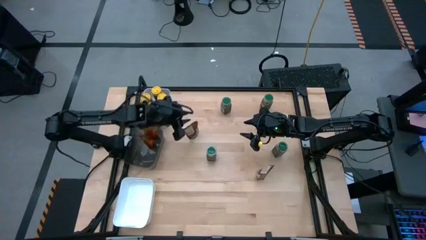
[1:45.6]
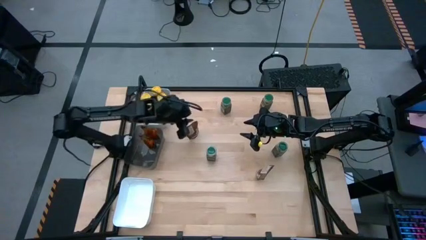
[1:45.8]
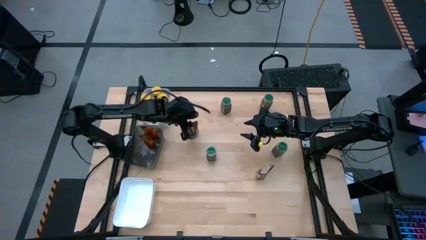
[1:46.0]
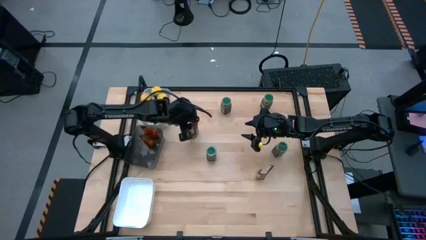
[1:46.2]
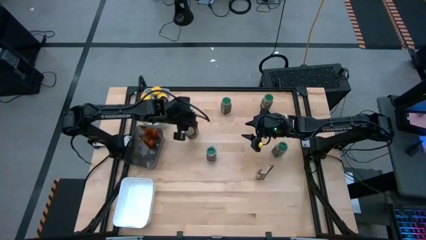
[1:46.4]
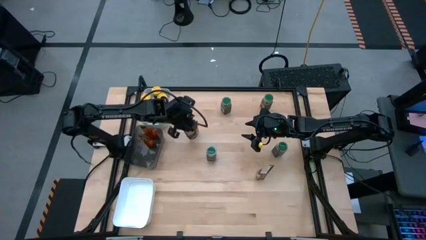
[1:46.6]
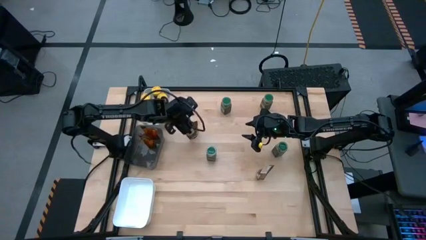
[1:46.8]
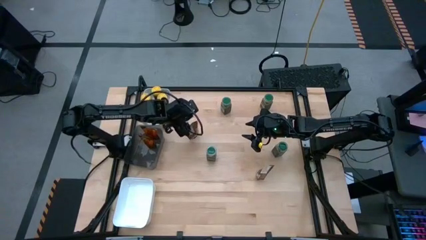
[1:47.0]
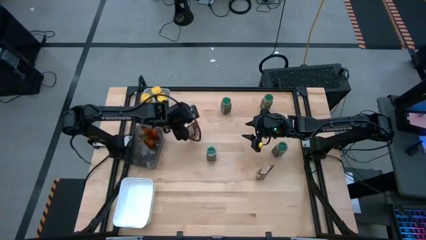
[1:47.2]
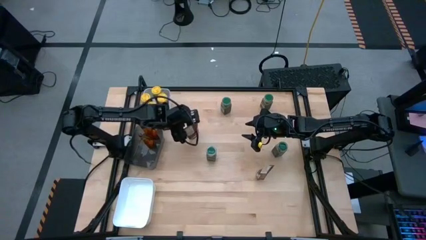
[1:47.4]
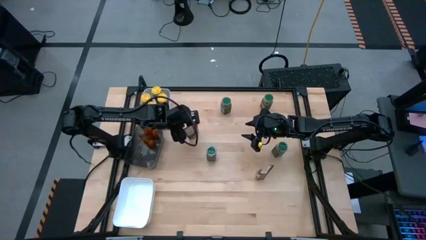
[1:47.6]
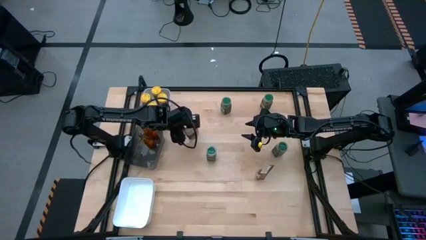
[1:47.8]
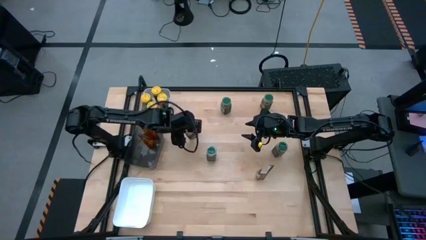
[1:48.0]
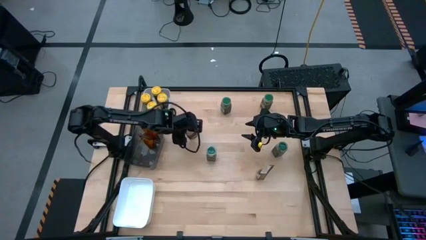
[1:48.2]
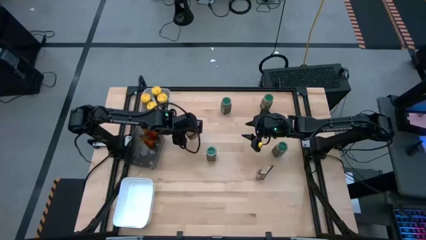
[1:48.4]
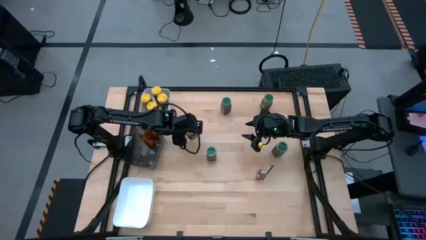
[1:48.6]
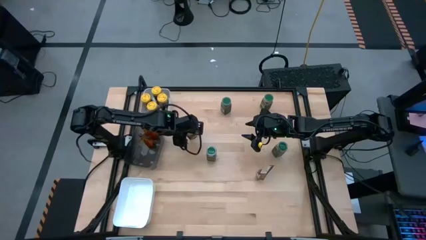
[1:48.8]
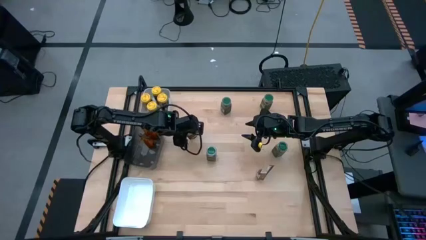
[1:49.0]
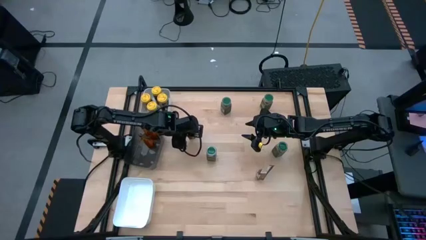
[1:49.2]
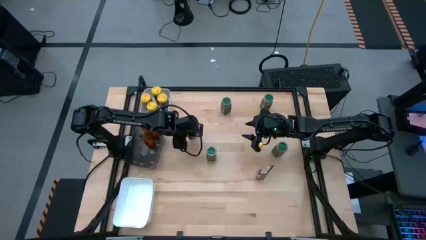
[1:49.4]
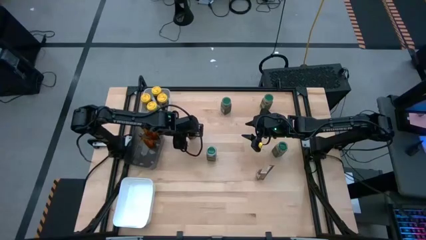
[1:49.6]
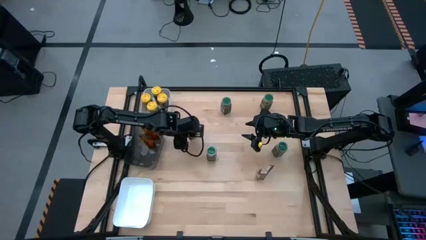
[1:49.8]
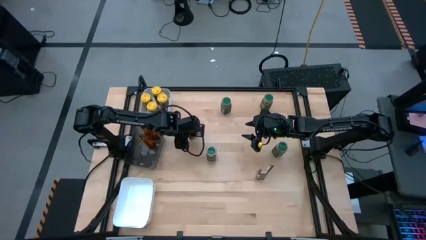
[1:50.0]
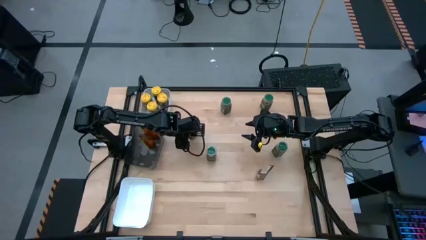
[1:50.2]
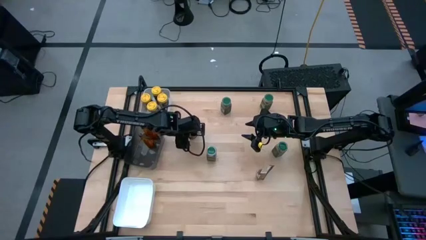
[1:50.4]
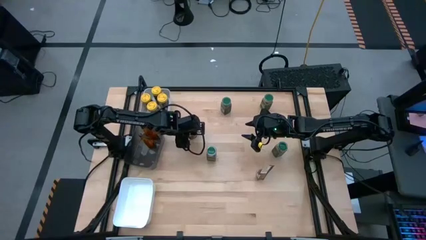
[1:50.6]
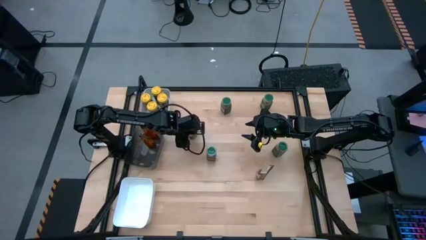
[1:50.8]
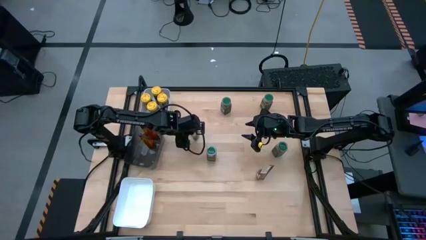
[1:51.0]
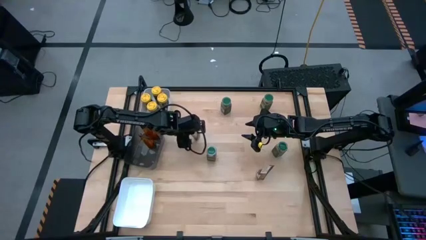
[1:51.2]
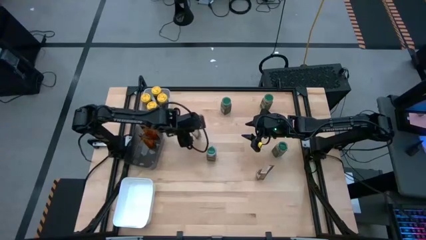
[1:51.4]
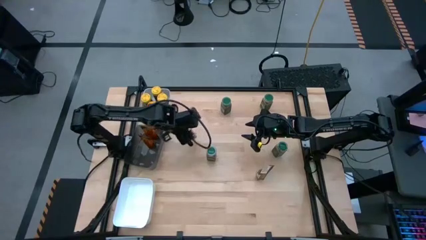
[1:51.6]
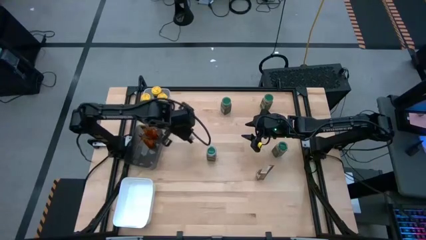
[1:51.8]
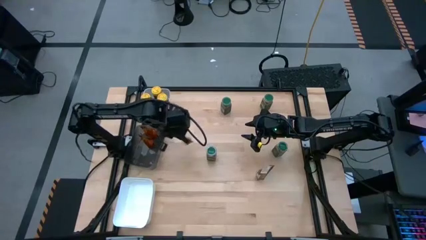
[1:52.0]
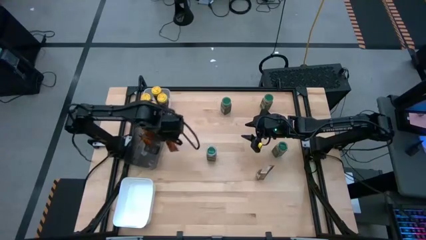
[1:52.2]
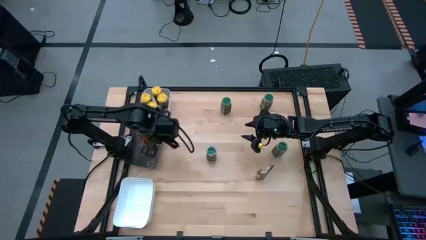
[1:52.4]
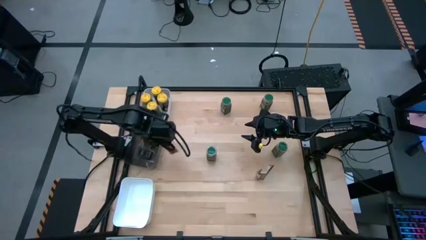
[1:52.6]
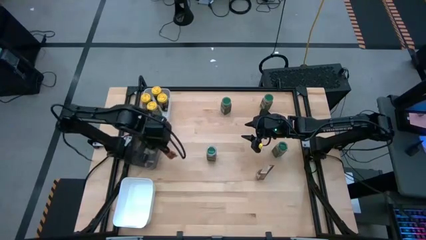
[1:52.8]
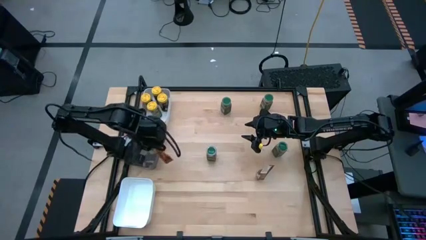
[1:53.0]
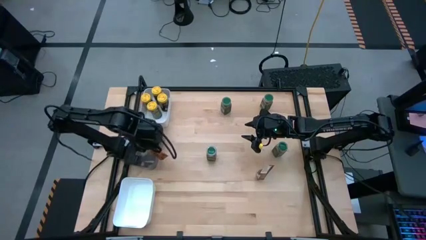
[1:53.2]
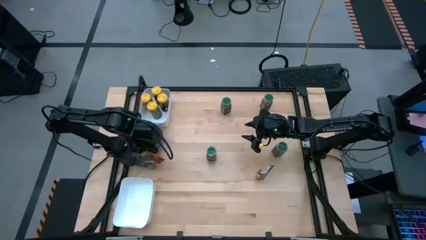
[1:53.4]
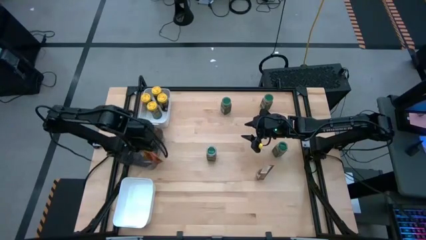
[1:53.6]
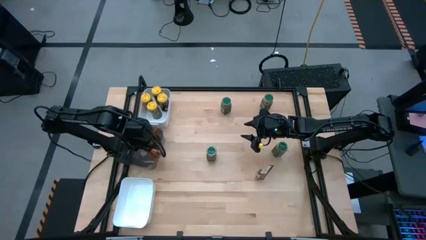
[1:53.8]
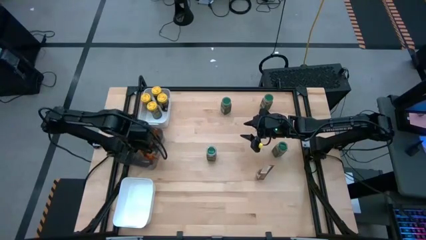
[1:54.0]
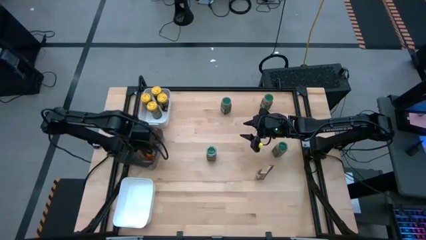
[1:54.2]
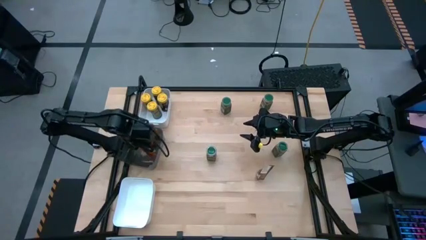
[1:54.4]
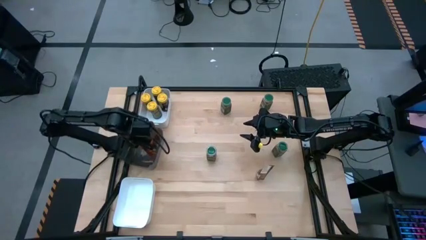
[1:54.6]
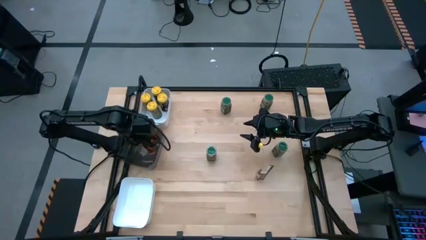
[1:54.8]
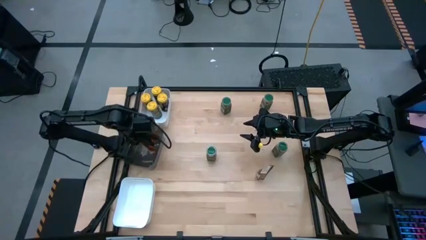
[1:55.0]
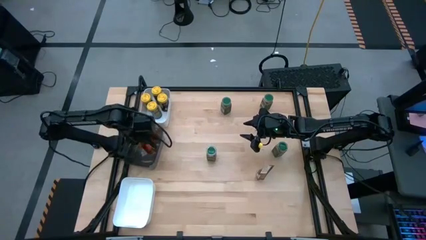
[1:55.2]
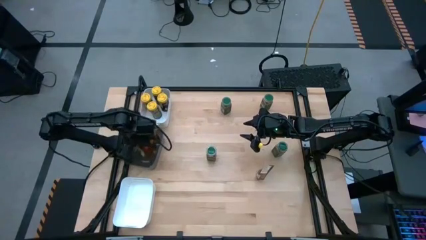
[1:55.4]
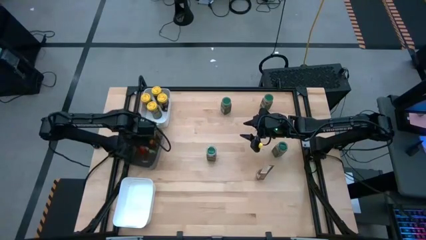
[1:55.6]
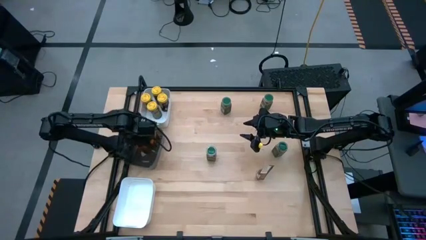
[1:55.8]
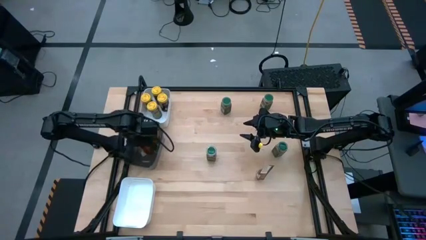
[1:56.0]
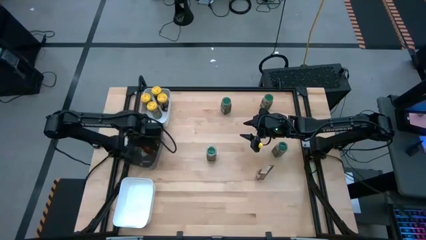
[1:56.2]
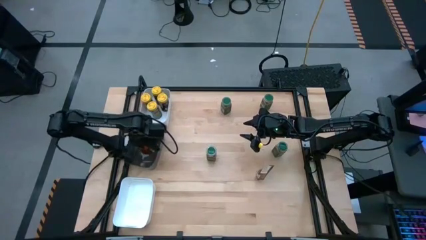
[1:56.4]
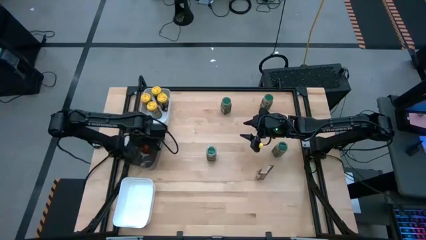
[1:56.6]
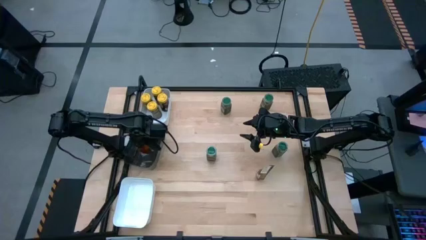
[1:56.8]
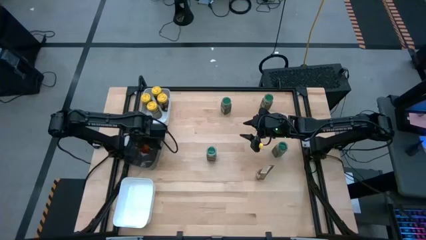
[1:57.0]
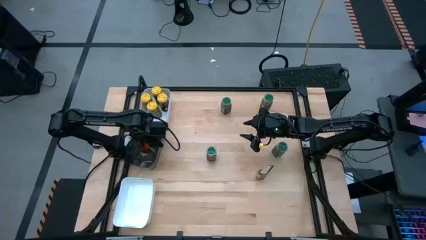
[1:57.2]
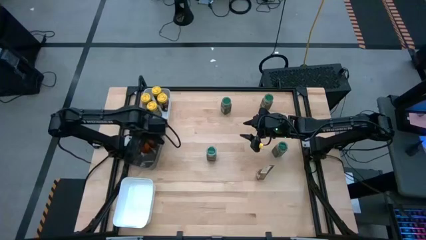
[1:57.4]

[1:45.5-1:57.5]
Task: Sort spices by type
Put the top orange seasoning pack into the black bin
